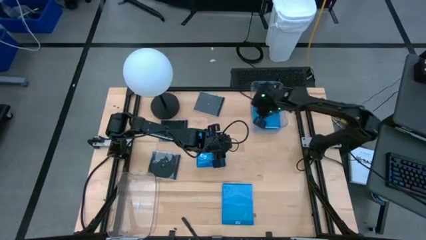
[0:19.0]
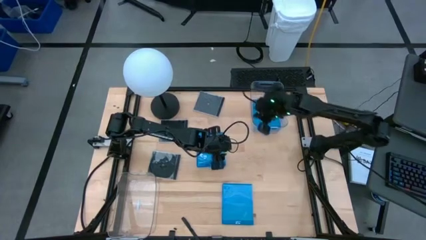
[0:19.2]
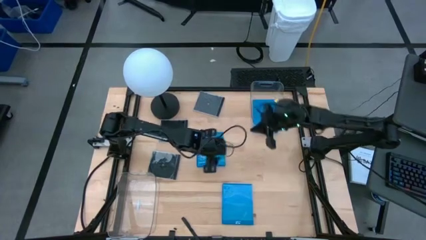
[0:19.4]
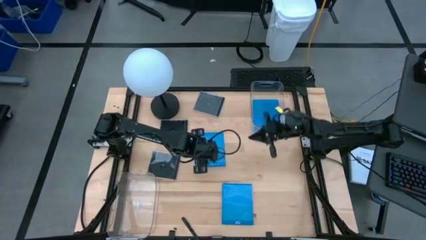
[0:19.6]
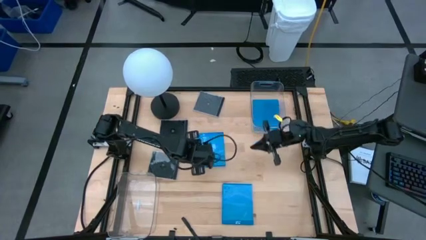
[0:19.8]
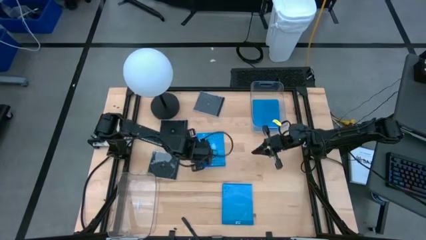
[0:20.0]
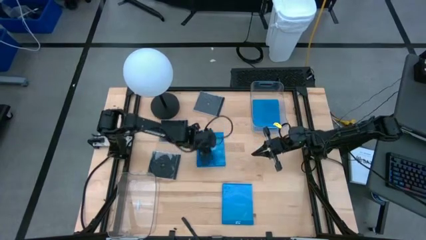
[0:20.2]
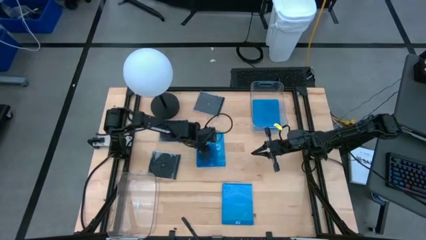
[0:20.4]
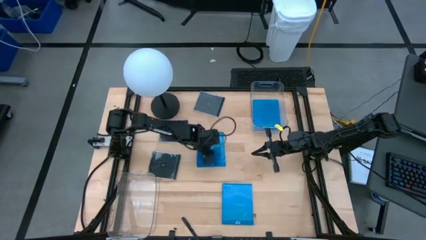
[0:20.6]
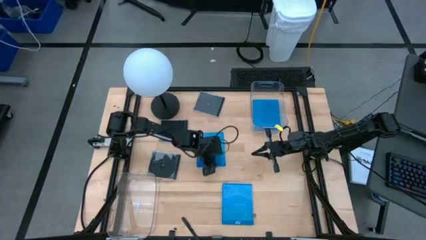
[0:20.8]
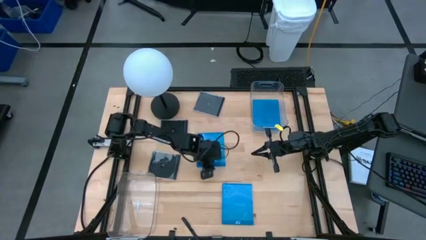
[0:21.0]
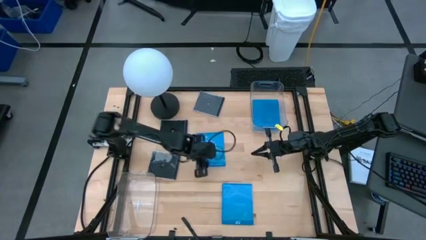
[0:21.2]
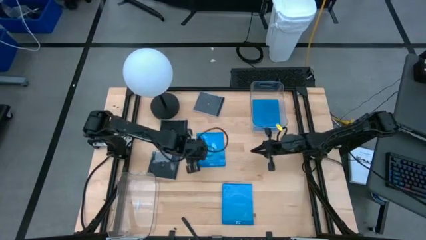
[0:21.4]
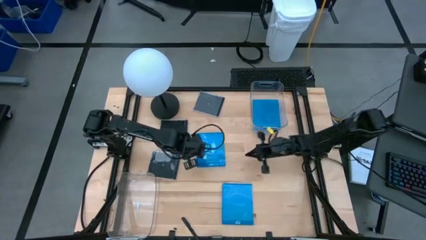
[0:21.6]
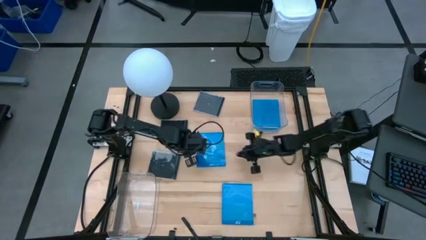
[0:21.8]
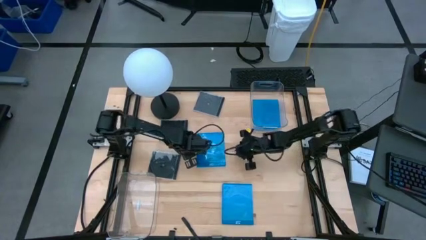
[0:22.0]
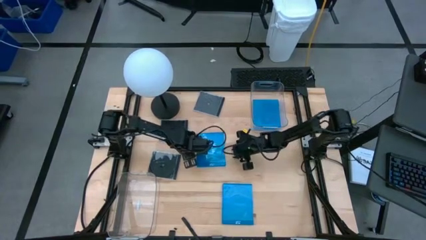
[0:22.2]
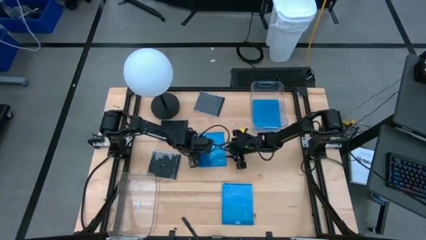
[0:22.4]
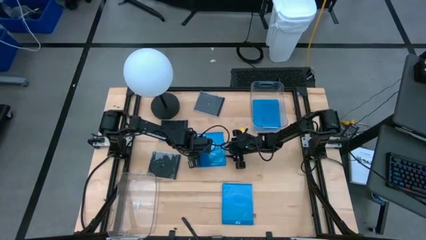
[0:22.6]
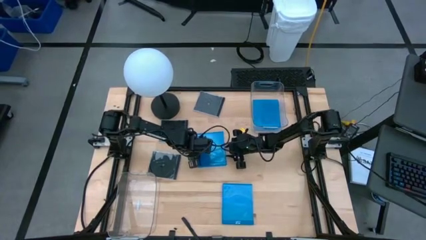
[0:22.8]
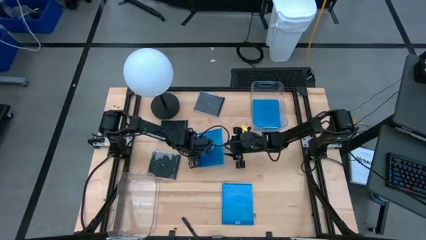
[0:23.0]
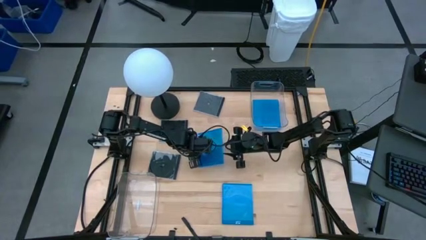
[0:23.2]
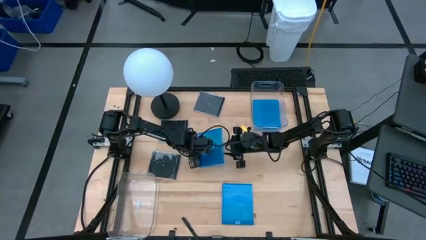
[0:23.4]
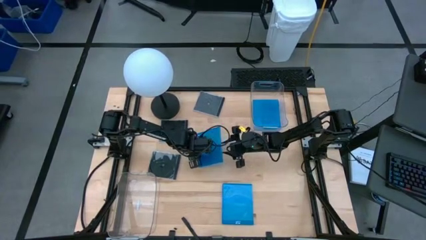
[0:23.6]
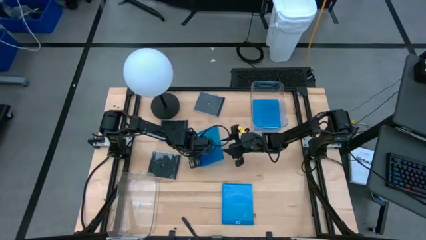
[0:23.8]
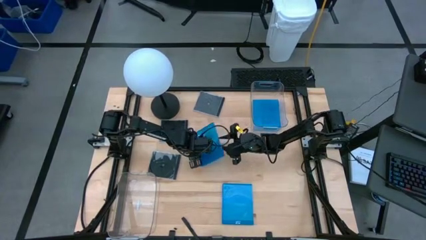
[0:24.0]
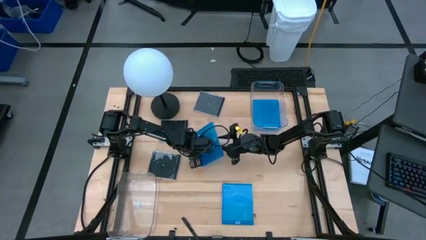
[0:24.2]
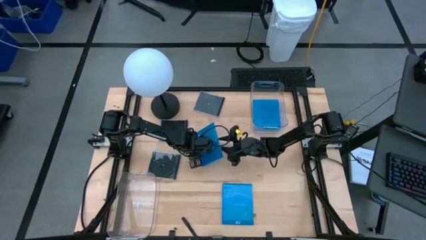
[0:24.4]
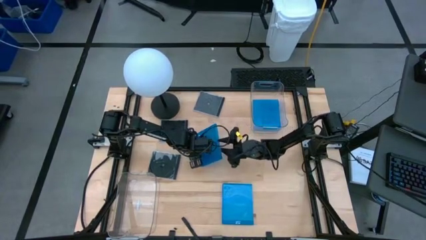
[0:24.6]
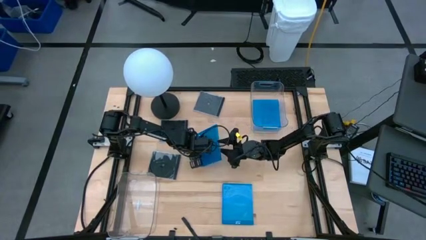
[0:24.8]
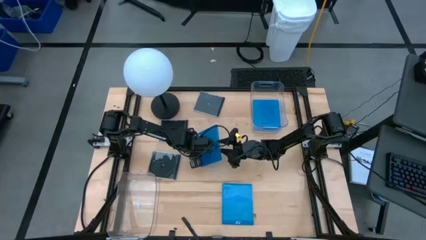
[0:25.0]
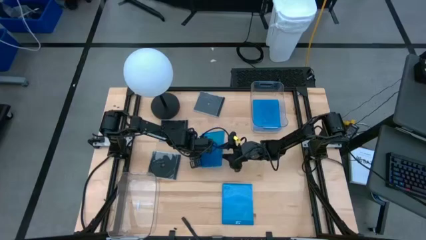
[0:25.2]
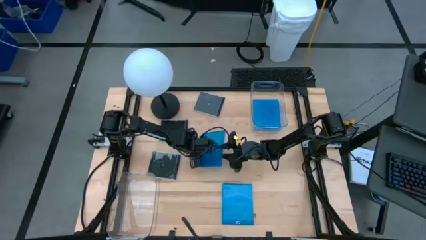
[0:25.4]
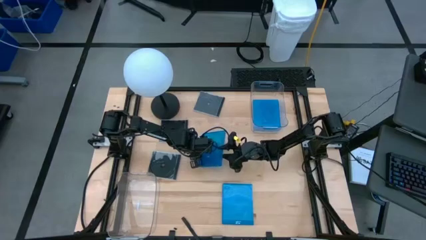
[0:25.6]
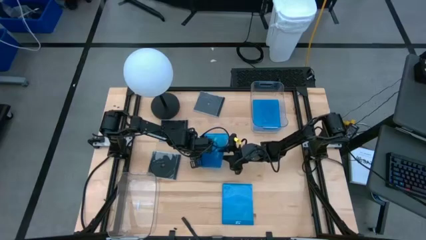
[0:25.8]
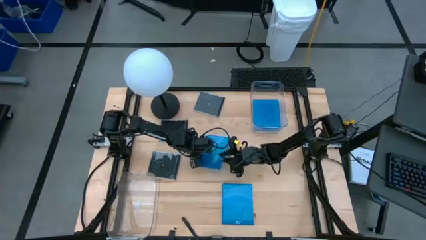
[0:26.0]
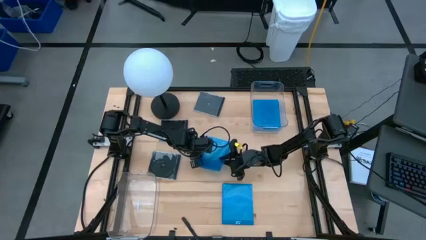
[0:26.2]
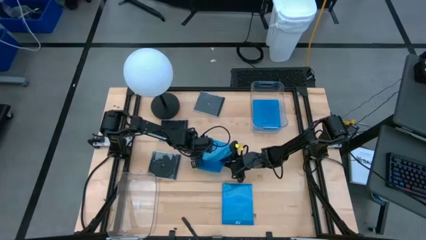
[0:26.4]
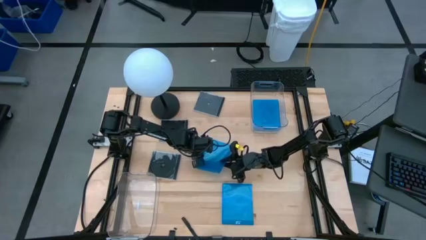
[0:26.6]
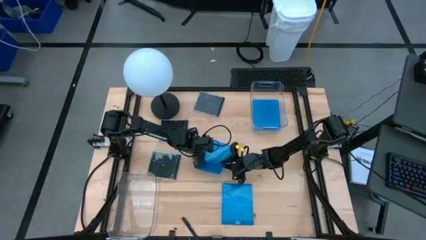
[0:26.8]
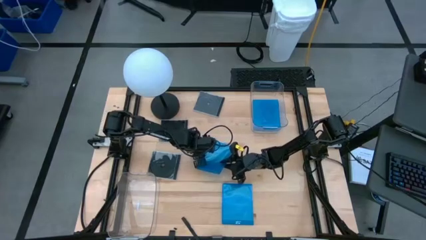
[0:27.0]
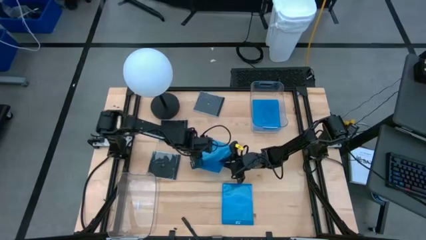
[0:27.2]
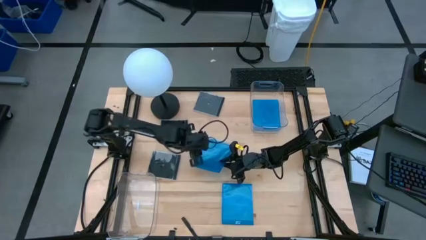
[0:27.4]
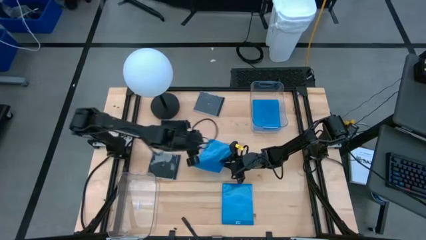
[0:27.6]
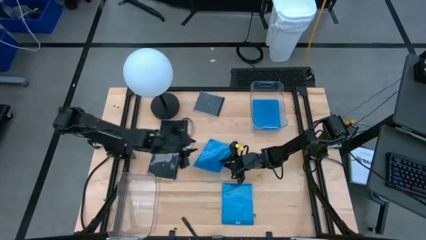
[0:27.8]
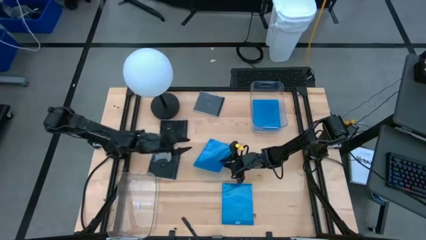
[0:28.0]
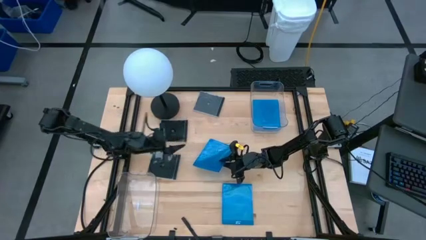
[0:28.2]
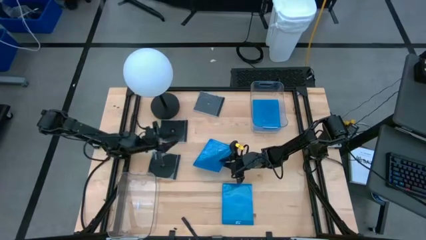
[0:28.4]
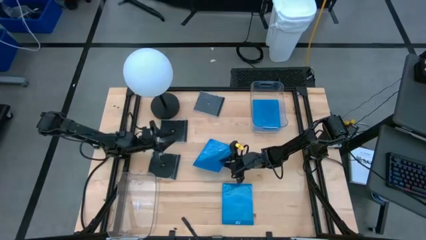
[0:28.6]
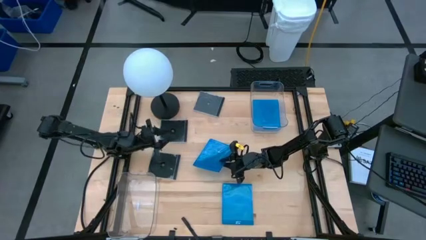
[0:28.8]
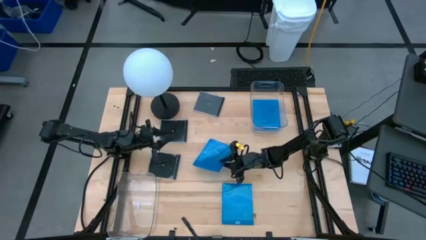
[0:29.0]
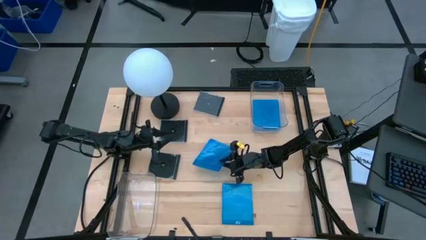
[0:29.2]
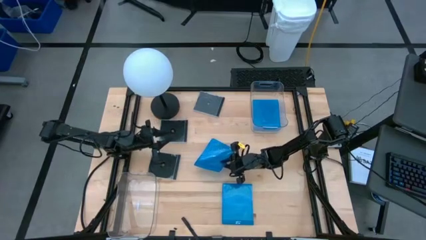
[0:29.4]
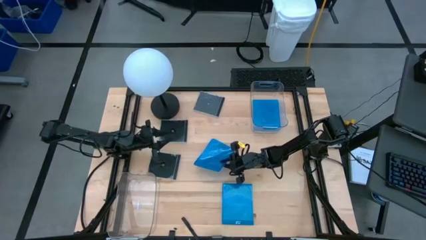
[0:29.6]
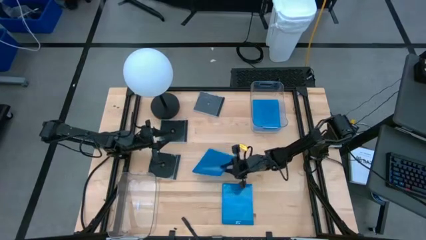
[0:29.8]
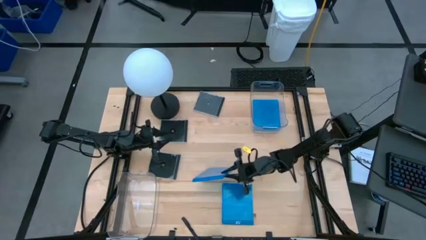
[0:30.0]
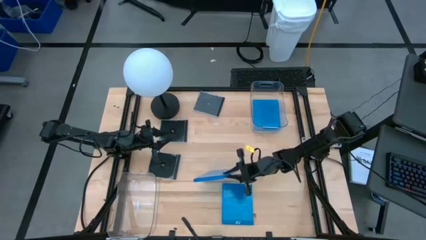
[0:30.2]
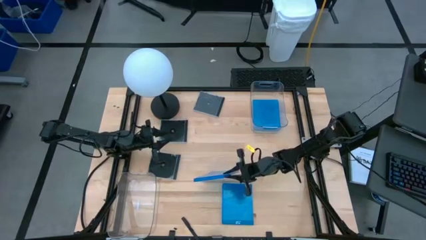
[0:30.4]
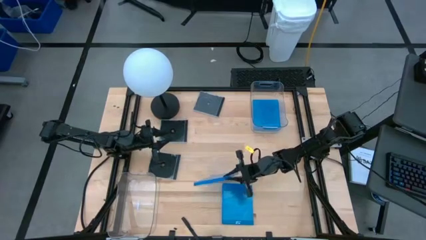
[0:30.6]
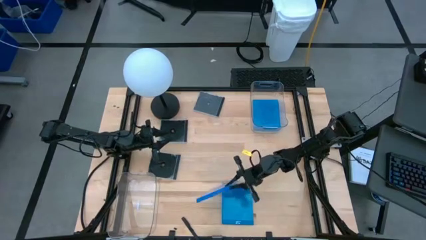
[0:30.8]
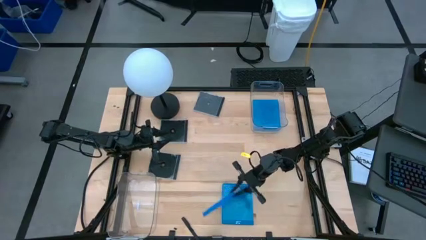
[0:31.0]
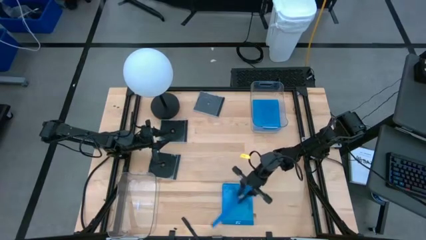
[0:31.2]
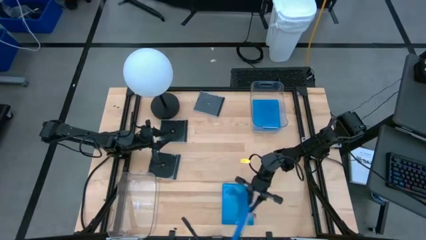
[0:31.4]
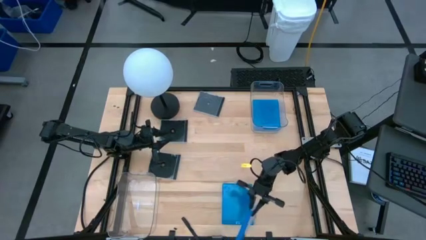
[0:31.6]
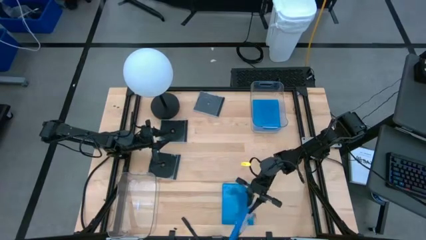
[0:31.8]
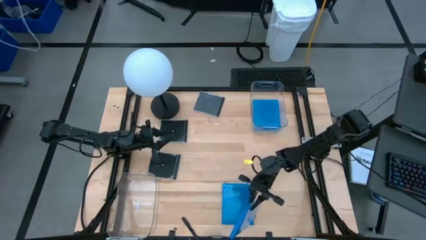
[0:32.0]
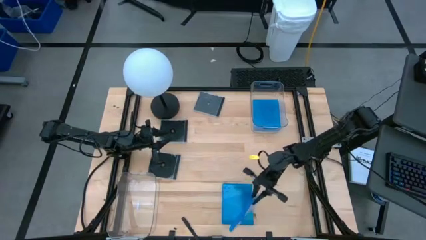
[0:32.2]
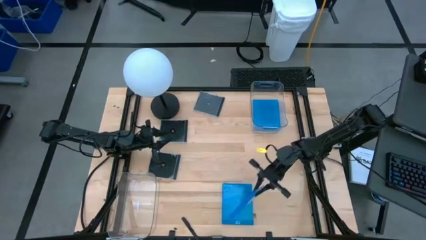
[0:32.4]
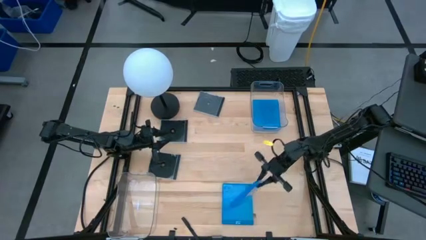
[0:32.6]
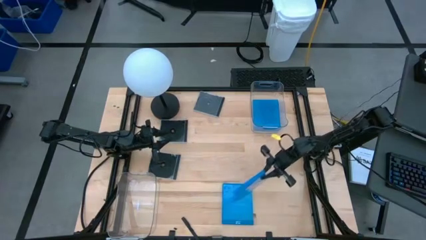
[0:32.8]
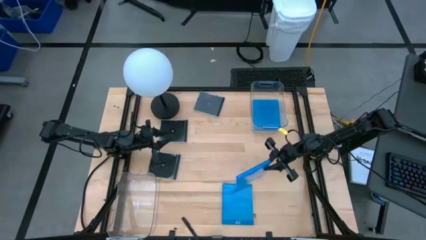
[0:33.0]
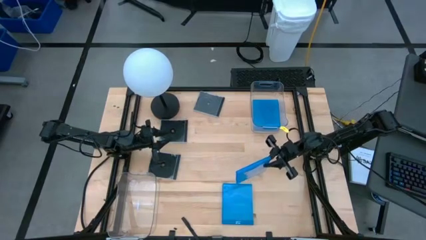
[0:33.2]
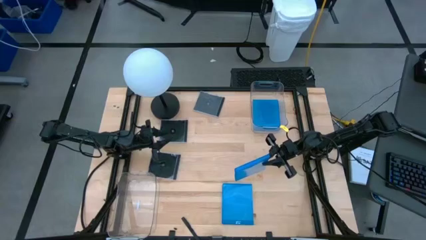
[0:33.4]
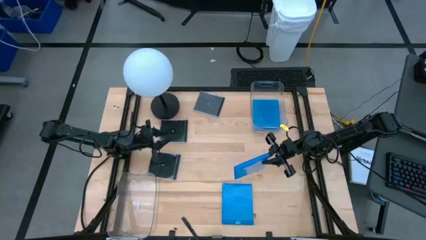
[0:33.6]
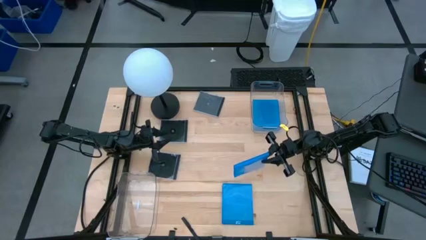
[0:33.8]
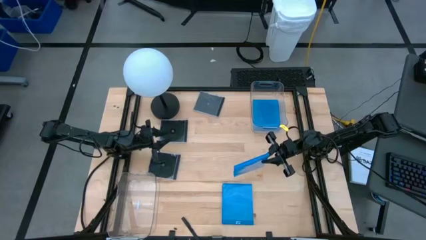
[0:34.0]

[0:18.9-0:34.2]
Task: Pick & place jewel cases by type
Put the top blue CD case into the top transparent bin
